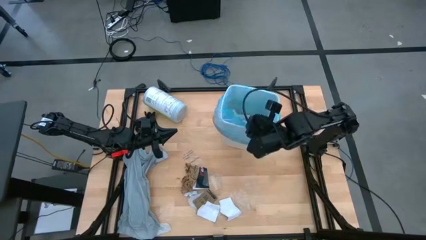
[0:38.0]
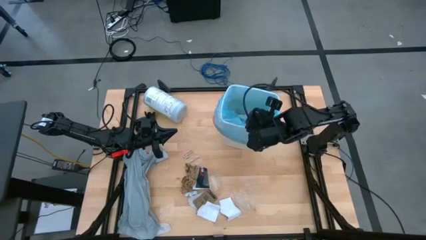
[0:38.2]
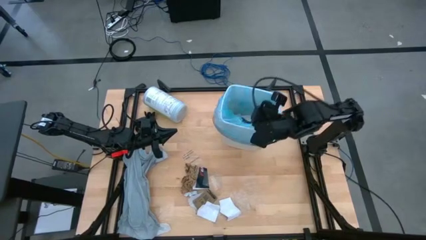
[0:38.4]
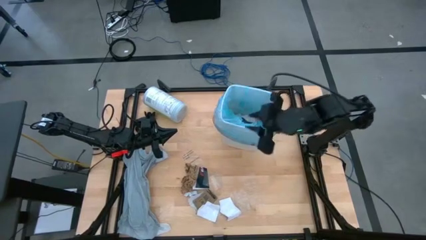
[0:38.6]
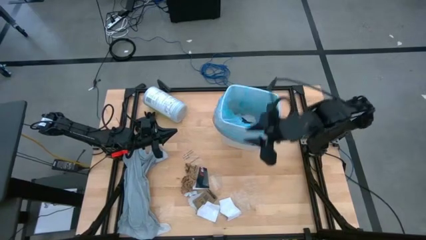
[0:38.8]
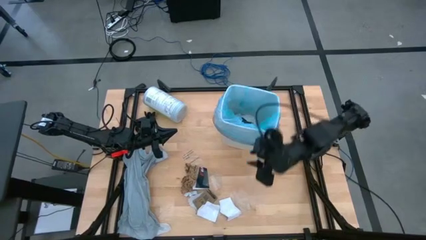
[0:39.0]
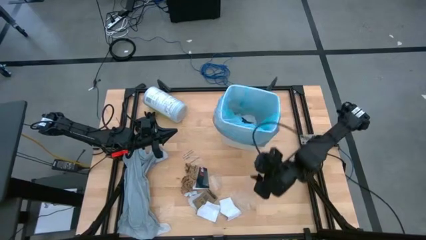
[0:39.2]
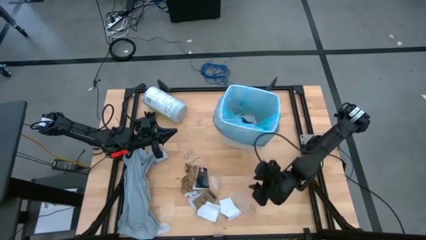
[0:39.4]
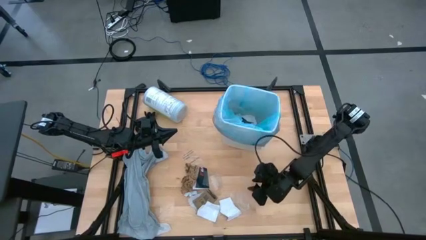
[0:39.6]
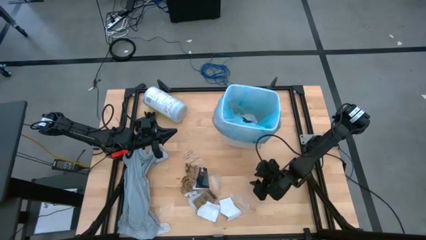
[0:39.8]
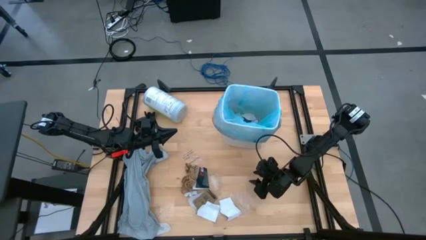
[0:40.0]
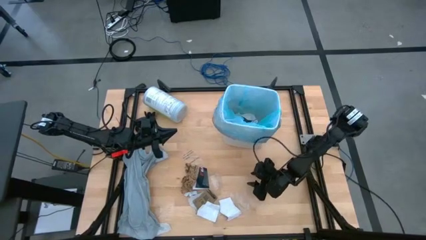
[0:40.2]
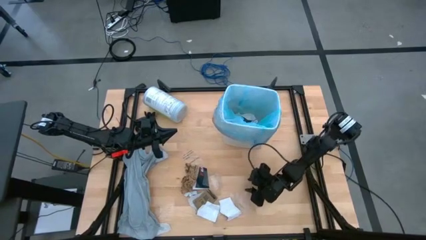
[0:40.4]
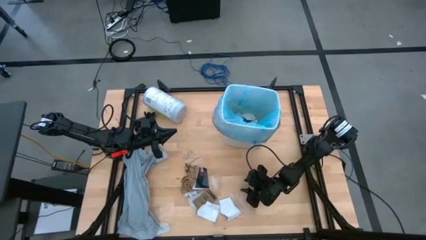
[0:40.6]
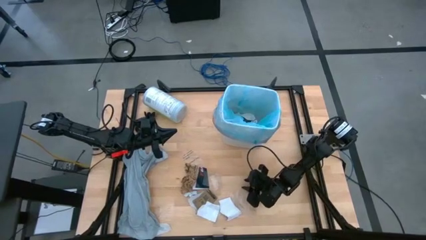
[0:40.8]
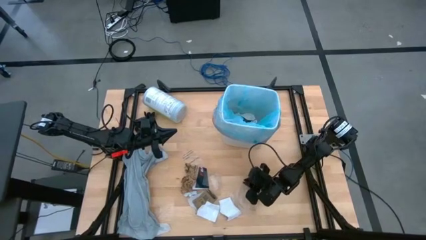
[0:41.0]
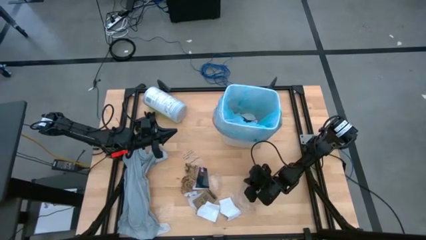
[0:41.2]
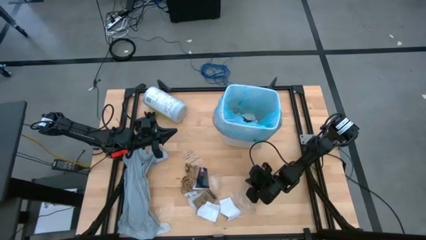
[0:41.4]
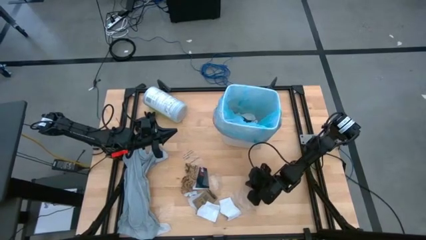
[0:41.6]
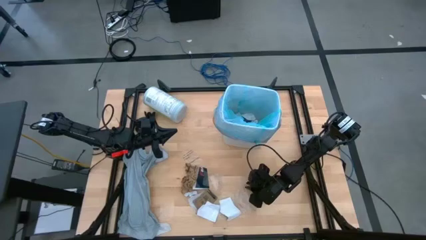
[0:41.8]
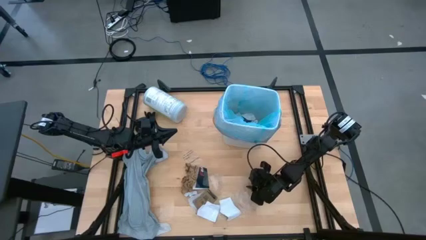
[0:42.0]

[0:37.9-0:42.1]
Task: place trash/remove bag and relplace
Put the transparent plastic into the trash bin

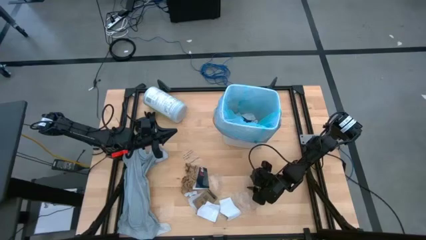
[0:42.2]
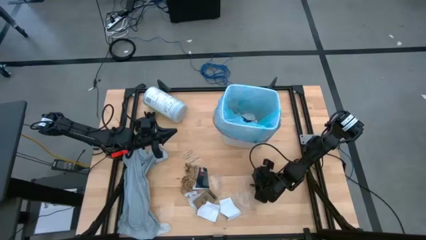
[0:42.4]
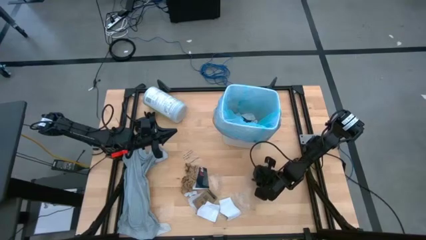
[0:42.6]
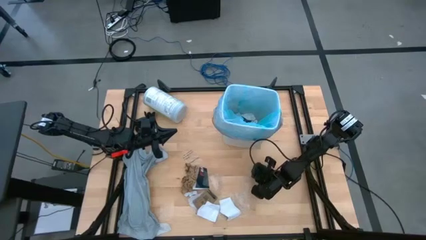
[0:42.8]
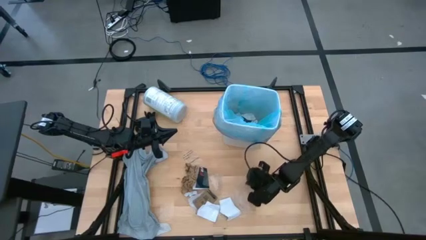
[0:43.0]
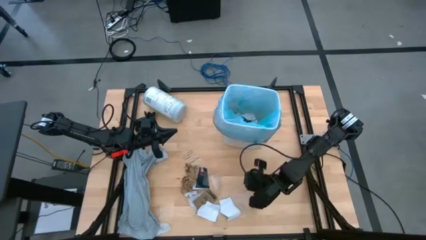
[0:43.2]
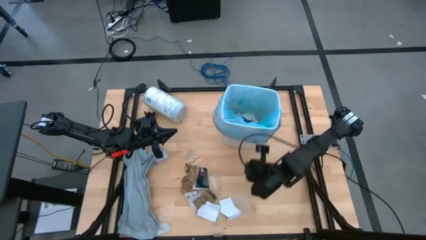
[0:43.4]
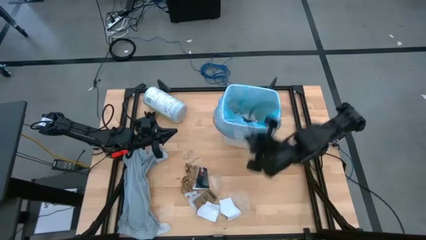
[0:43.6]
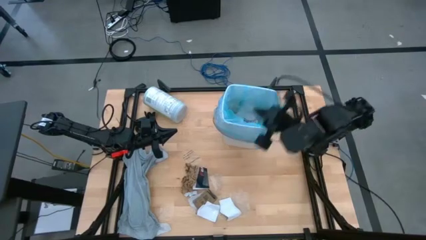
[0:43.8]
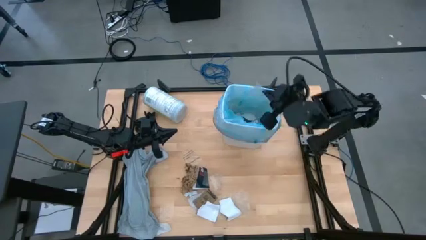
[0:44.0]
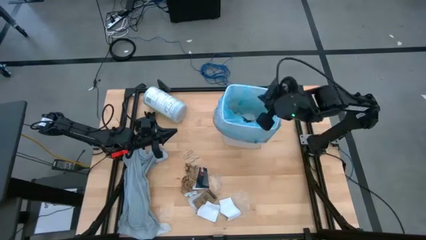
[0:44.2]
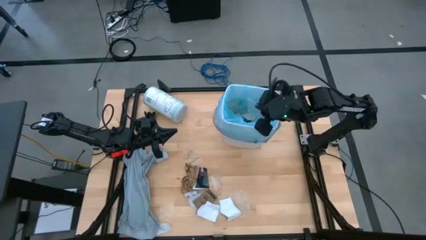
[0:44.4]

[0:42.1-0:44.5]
Put the transparent plastic into the trash bin

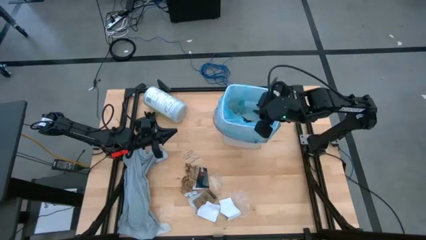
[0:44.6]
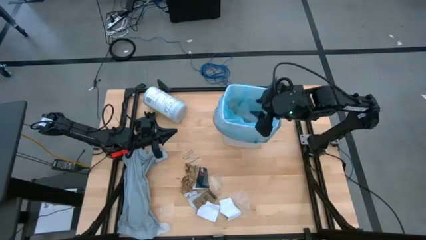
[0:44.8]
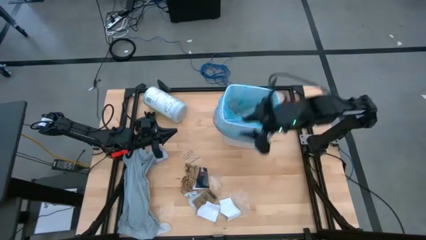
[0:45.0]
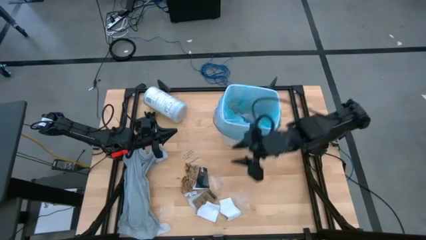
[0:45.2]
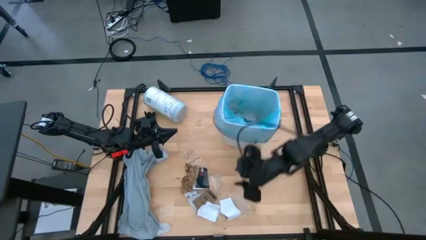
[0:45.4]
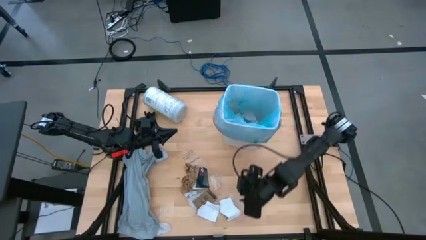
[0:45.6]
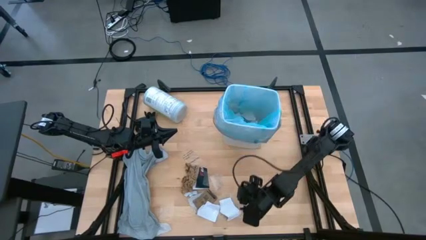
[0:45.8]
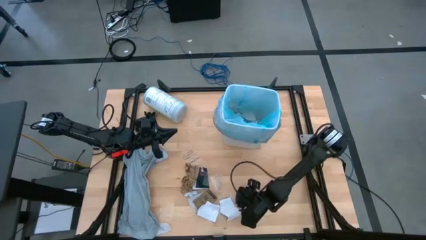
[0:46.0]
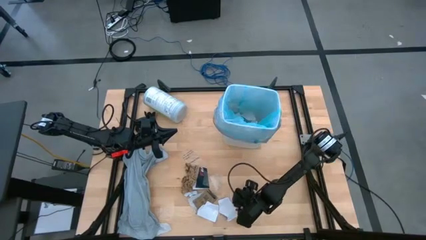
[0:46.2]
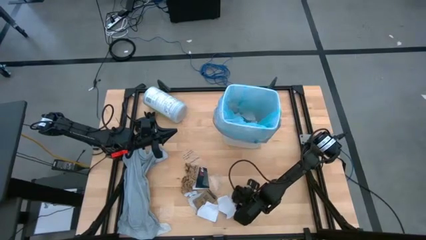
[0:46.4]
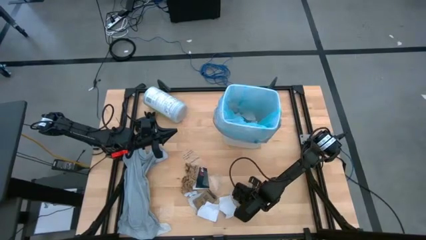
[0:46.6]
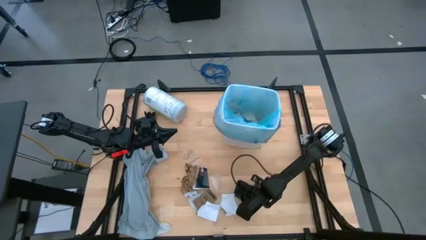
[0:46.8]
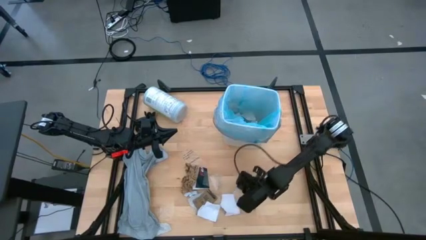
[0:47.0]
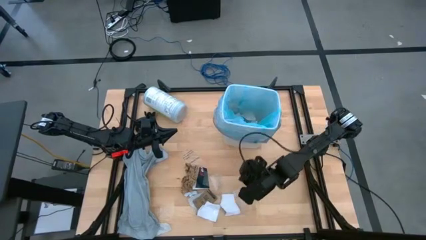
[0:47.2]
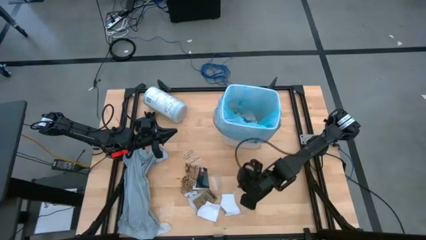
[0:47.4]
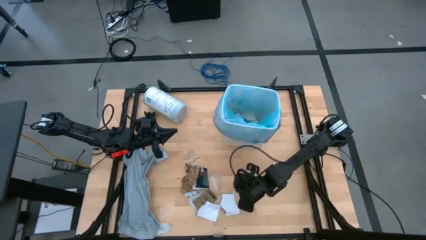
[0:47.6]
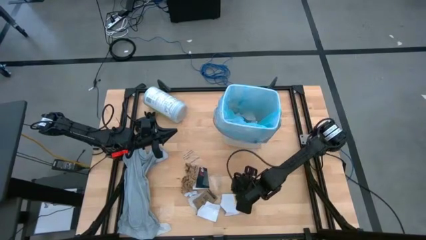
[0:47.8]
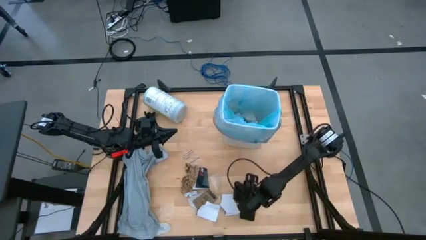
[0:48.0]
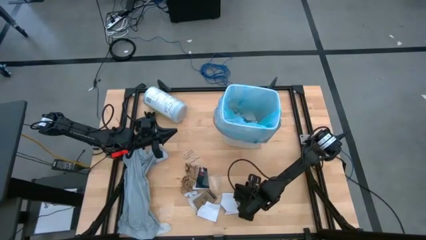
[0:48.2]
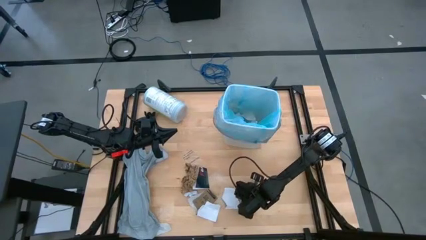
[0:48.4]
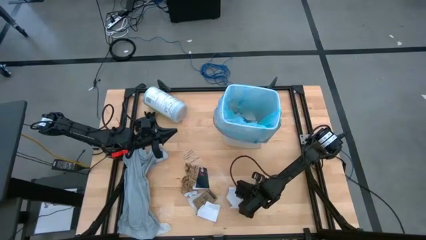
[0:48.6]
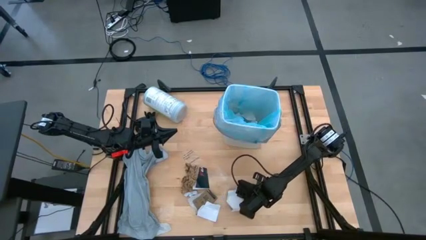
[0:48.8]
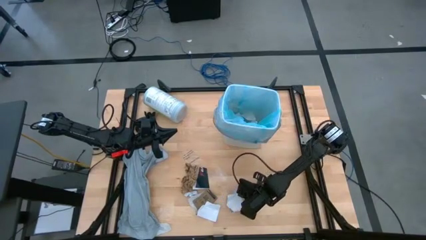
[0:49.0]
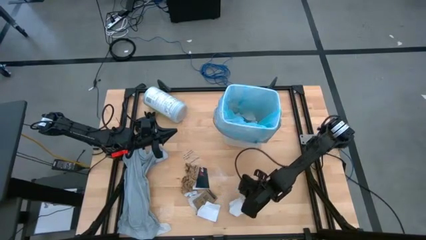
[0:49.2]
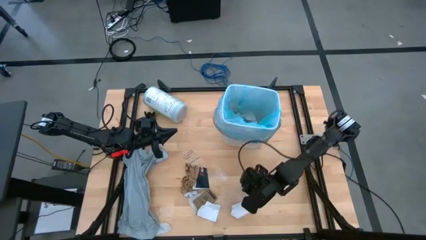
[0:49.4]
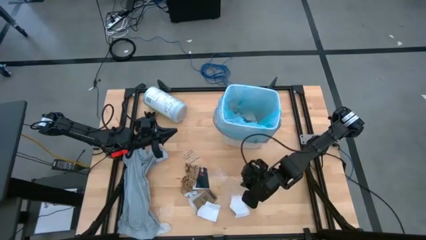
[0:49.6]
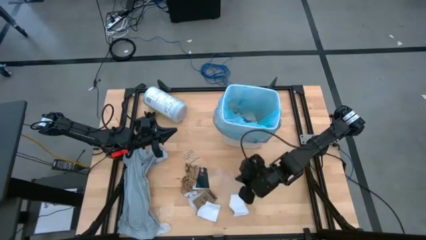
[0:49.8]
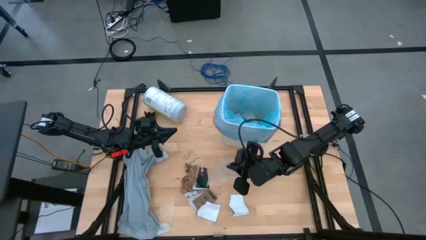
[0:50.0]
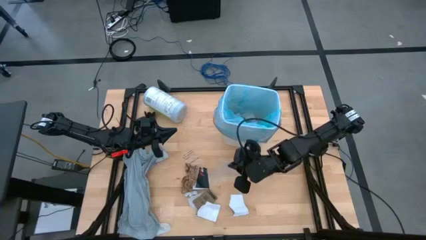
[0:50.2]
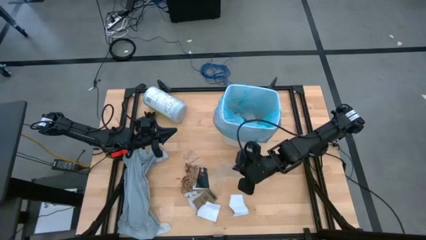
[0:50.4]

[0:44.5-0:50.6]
Put the transparent plastic into the trash bin

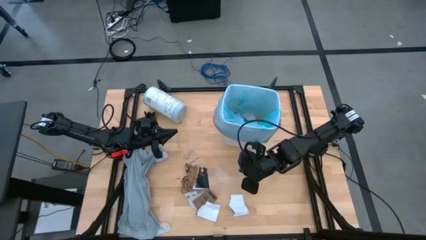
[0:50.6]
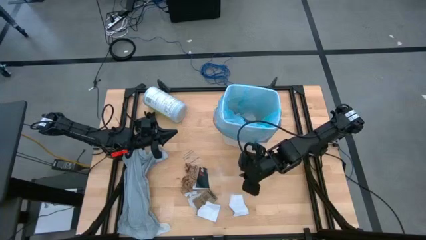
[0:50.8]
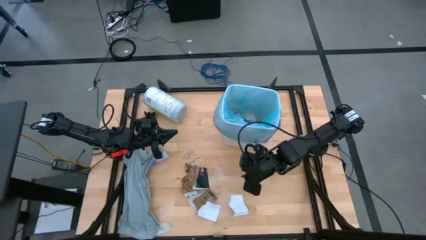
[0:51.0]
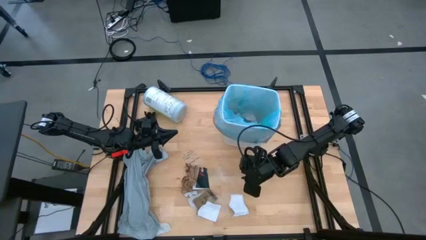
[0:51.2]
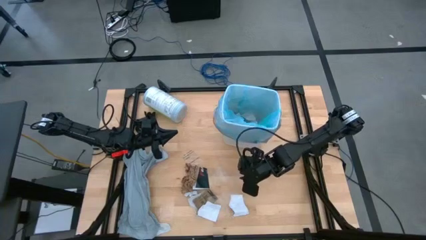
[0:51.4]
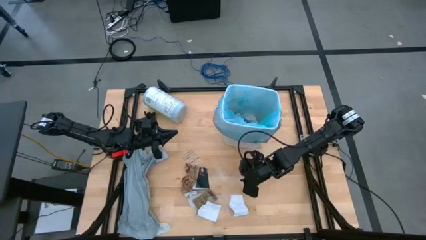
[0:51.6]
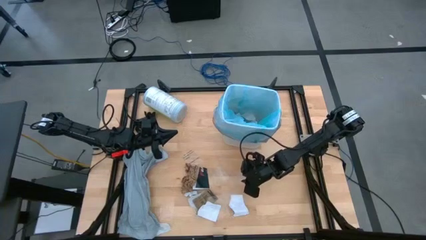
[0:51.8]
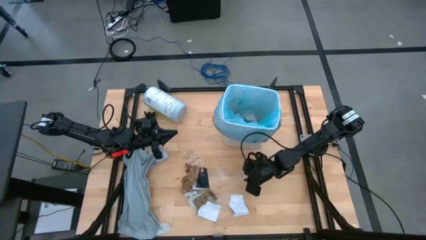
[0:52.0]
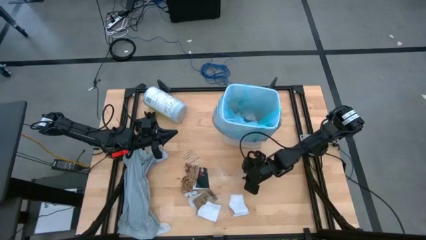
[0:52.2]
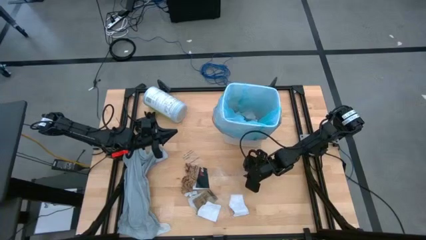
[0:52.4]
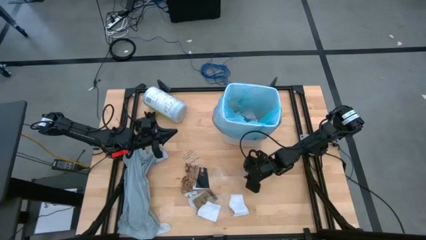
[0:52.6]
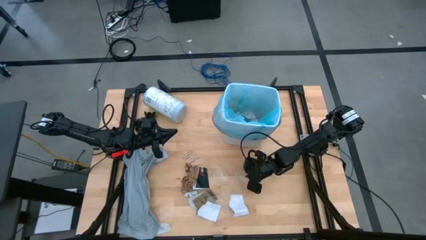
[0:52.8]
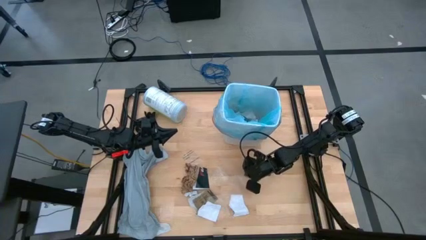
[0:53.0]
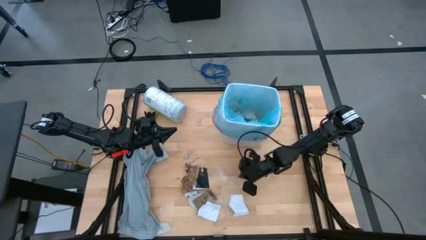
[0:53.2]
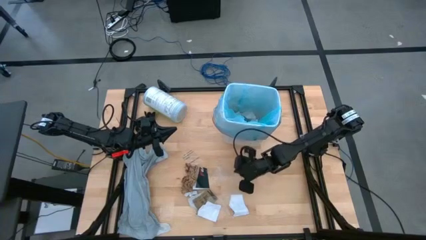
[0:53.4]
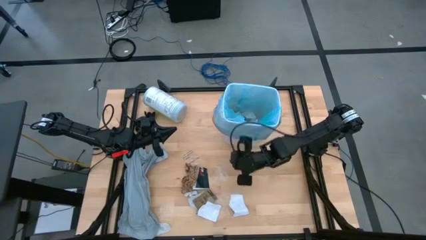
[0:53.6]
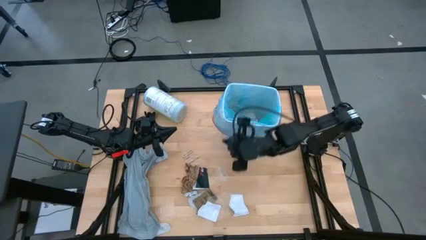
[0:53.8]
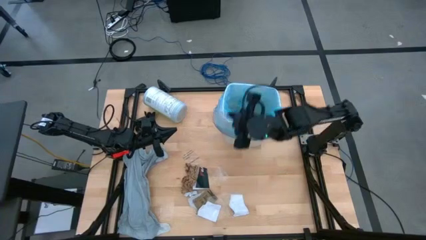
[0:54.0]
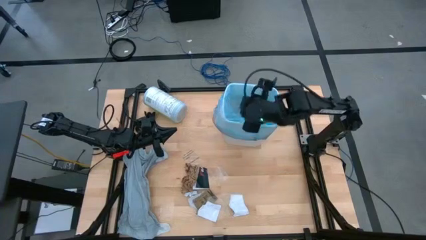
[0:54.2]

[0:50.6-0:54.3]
Put the transparent plastic into the trash bin
